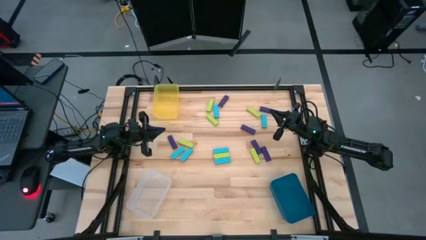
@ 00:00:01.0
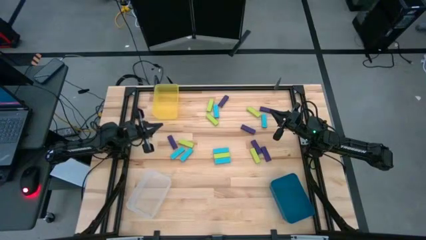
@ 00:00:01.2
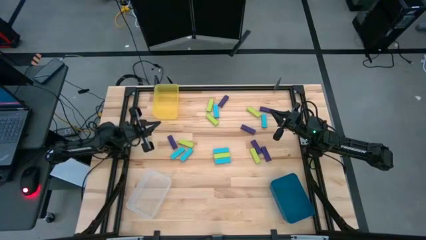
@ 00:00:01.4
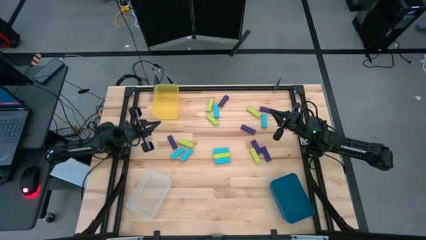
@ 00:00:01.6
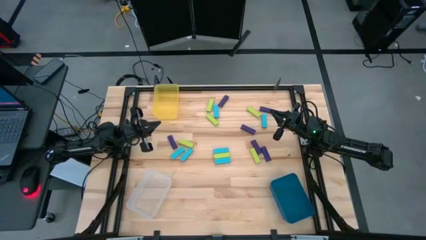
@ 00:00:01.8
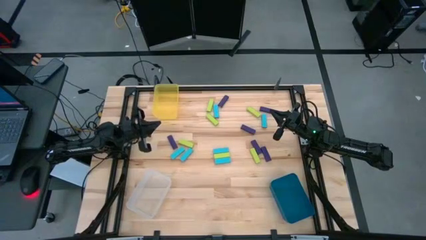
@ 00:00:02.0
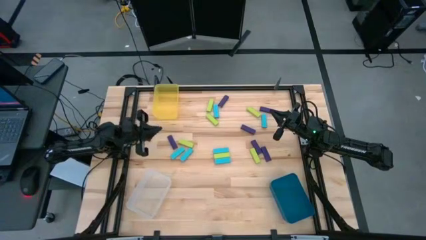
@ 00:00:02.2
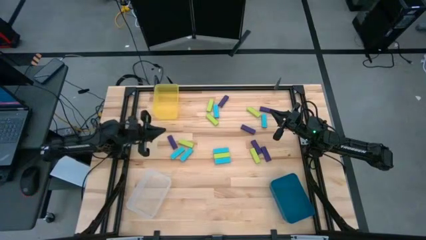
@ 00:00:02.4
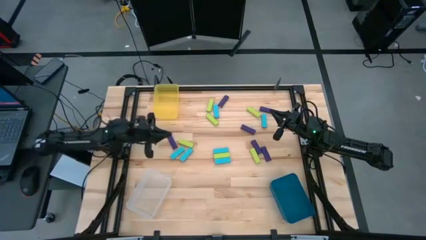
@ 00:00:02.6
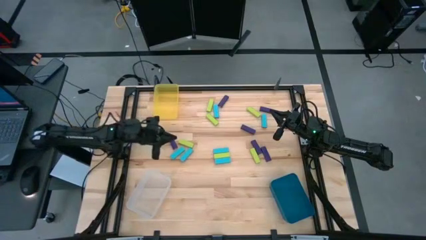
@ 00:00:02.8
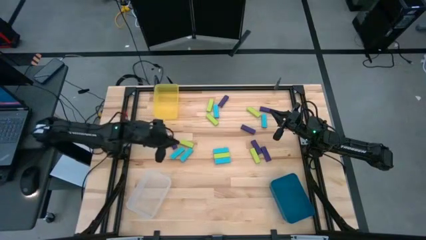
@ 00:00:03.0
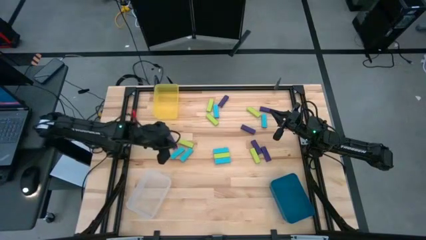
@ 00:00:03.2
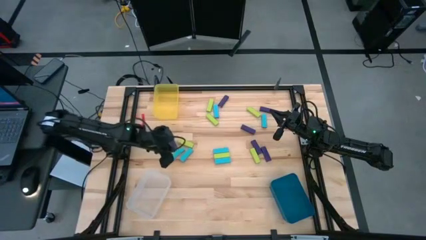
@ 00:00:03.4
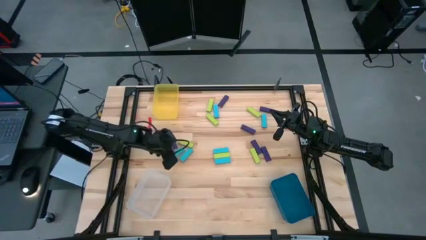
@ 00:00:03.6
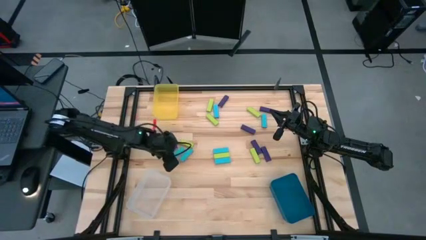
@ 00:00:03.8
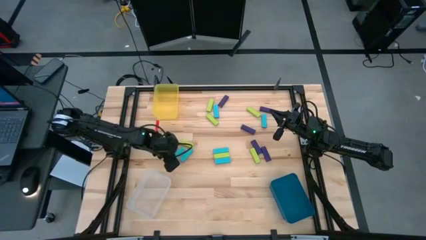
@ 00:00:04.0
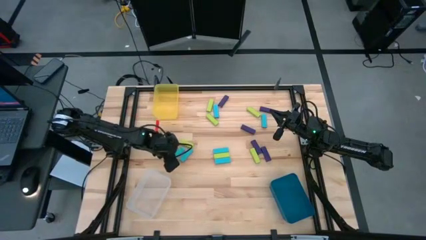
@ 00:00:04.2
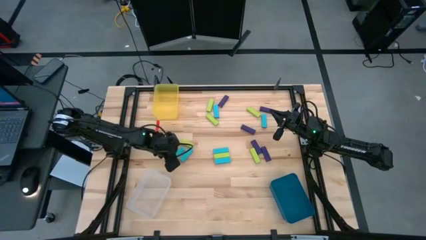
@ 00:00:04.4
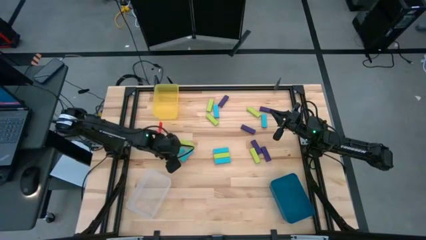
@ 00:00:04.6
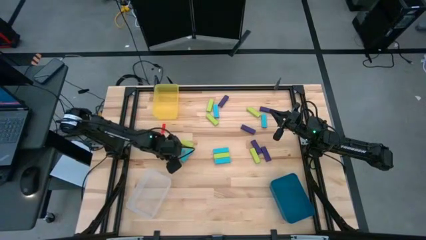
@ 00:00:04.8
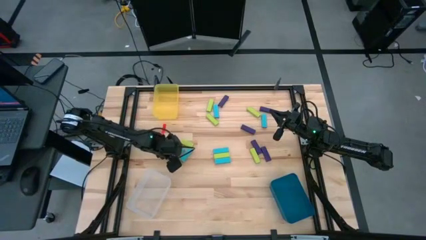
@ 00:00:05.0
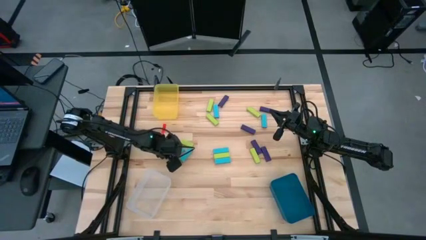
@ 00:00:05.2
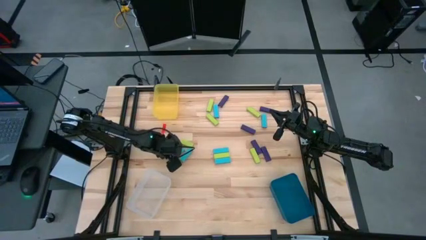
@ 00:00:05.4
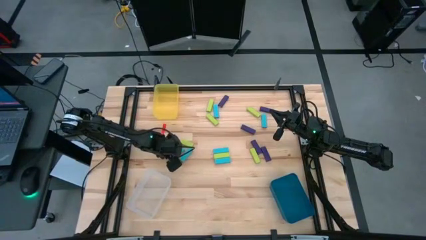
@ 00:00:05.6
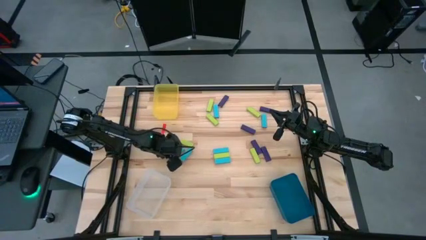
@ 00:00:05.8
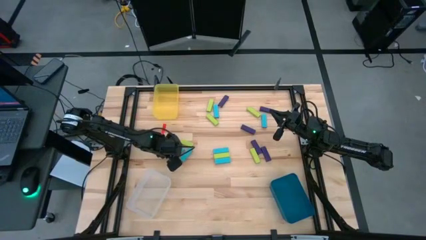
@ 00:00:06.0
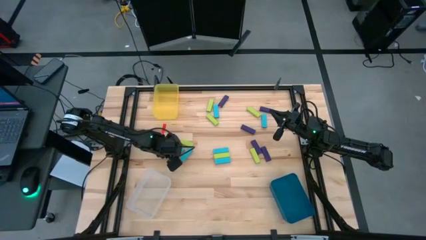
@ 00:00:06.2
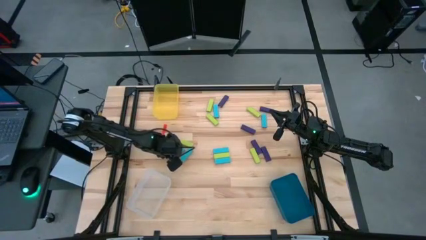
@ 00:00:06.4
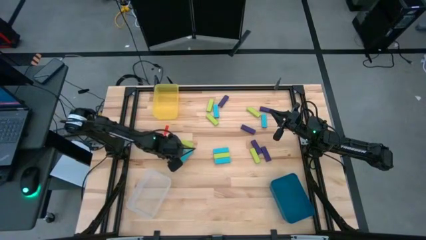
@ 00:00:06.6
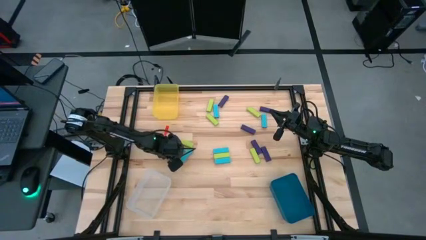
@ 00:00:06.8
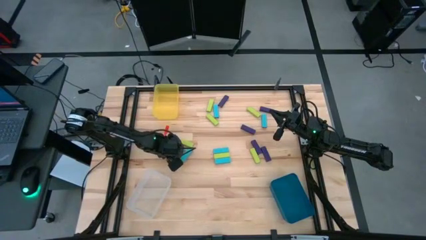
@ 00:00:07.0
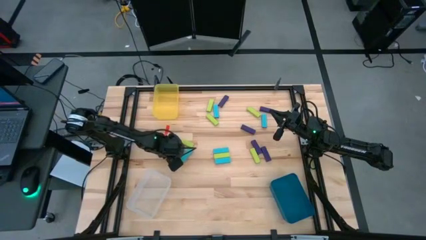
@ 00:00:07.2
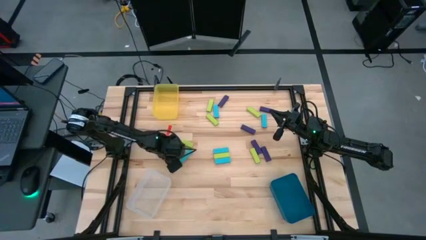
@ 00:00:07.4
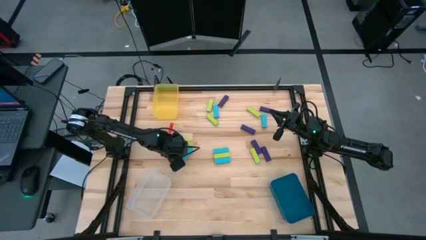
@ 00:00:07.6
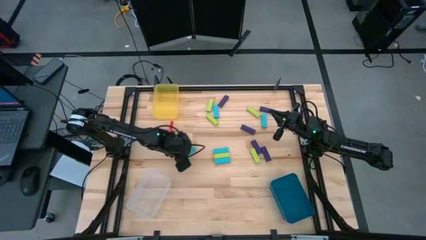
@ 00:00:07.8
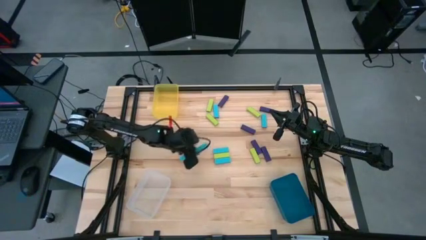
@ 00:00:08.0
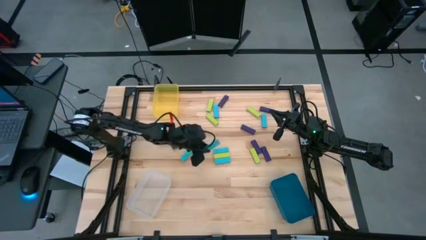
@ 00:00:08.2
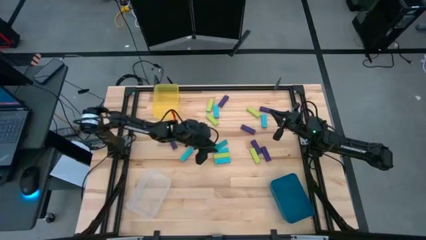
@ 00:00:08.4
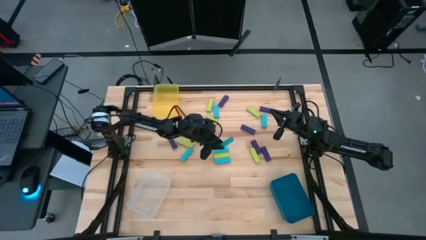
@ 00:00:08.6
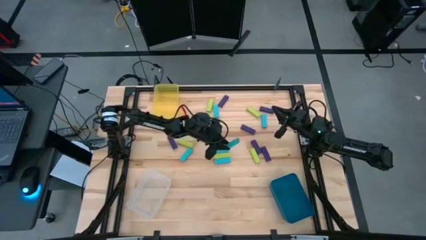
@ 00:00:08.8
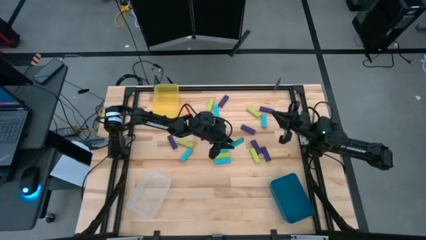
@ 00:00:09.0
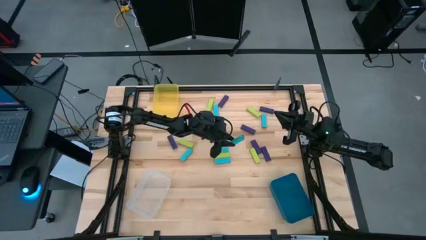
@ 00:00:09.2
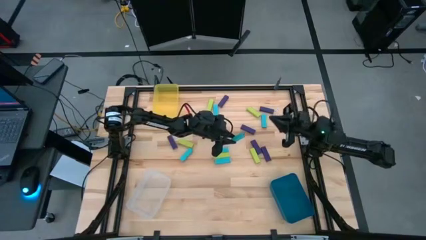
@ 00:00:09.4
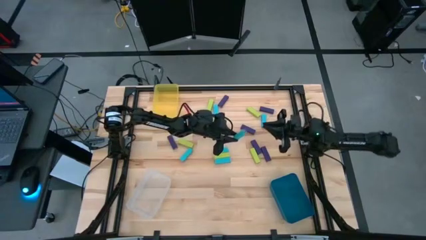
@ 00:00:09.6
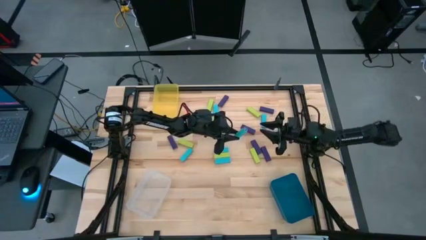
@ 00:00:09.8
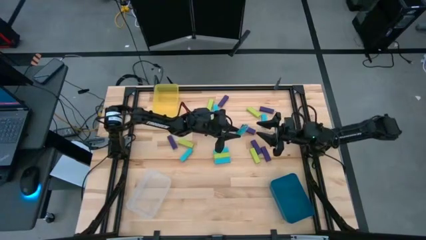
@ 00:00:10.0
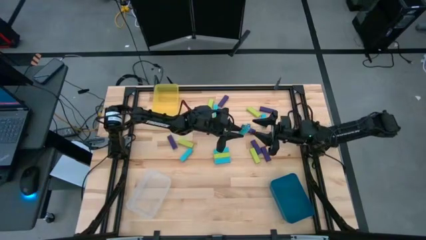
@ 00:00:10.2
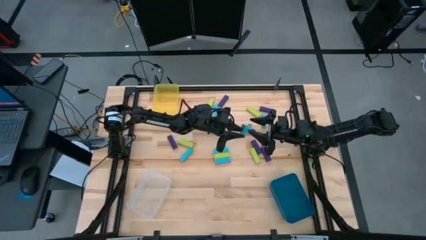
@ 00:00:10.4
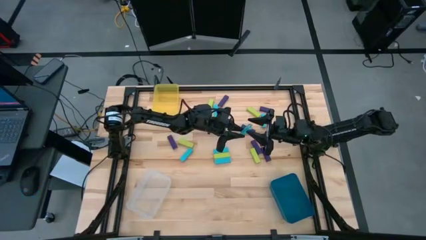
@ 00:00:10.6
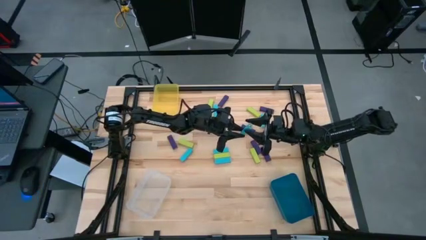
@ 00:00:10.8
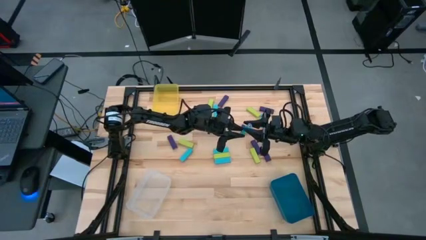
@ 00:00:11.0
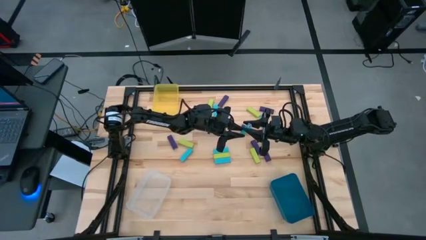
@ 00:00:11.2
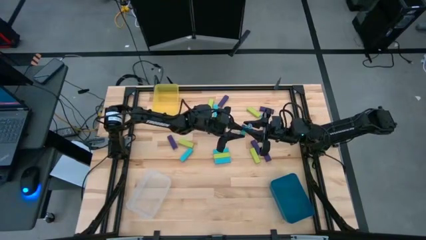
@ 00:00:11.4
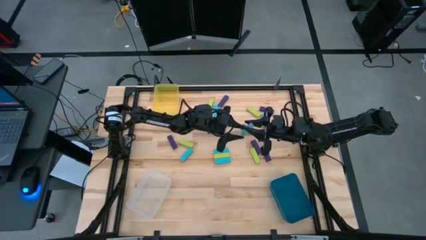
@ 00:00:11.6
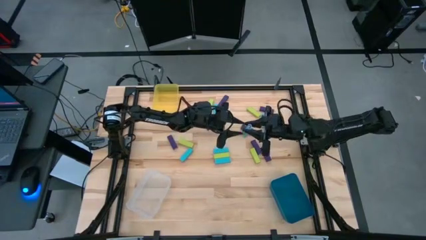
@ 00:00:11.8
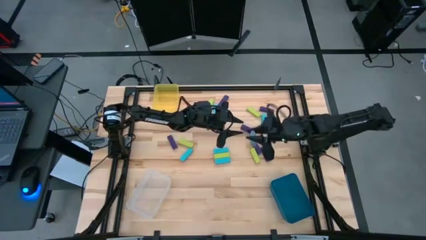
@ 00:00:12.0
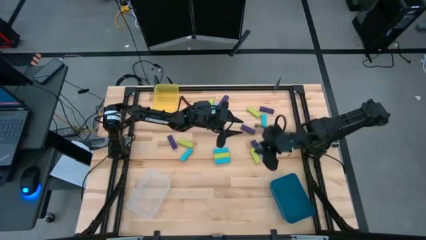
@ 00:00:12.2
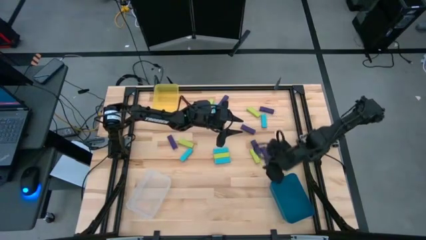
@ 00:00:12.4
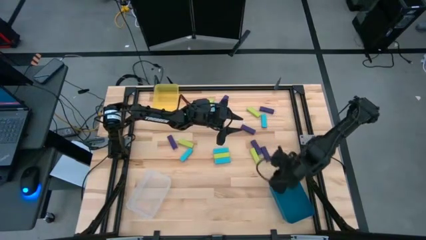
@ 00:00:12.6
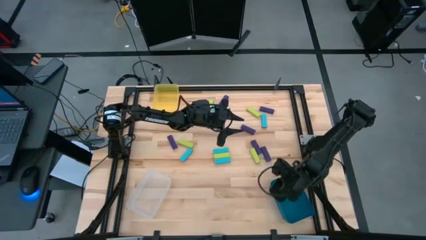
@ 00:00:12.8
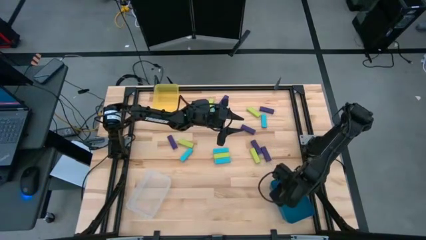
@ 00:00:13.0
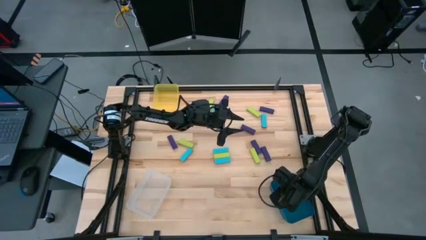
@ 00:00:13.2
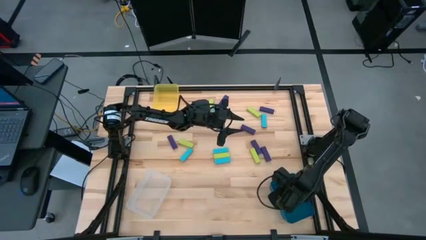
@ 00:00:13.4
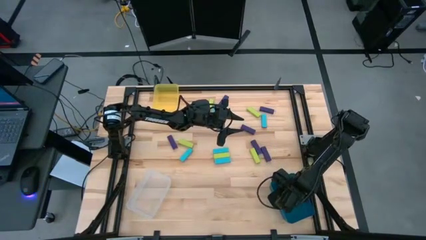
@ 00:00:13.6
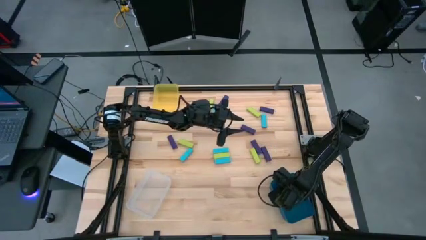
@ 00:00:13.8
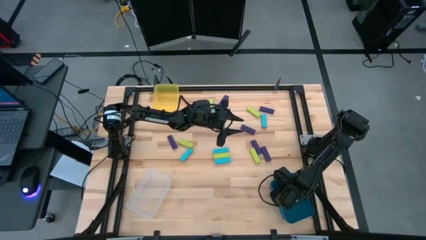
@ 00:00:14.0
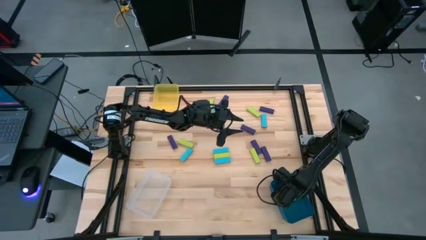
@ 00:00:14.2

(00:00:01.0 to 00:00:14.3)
Task: Sort blocks
Put the blue block into the blue bin
